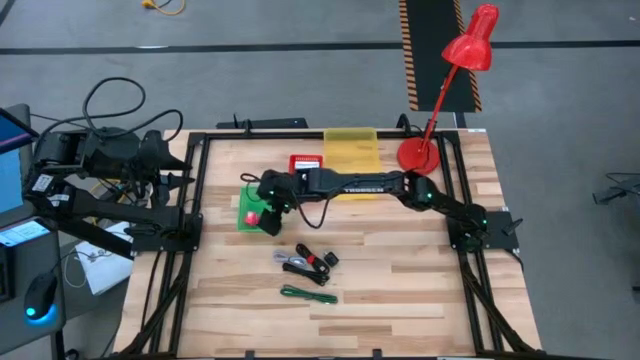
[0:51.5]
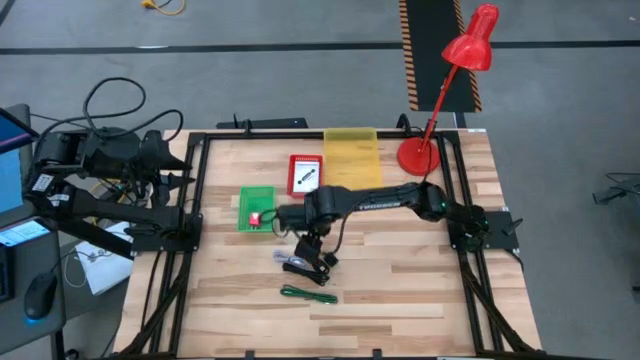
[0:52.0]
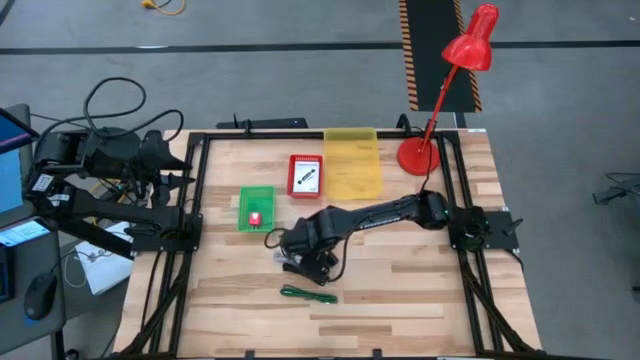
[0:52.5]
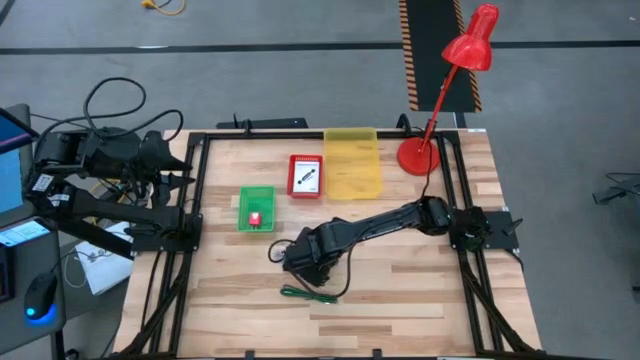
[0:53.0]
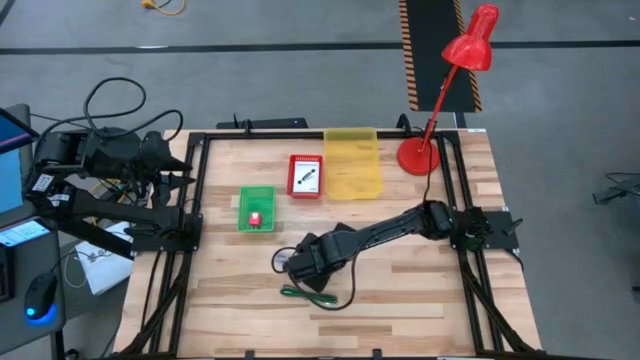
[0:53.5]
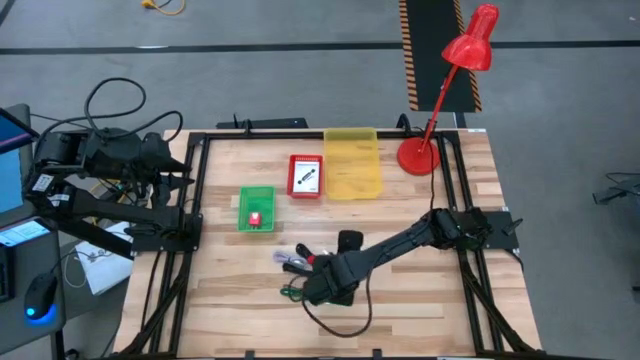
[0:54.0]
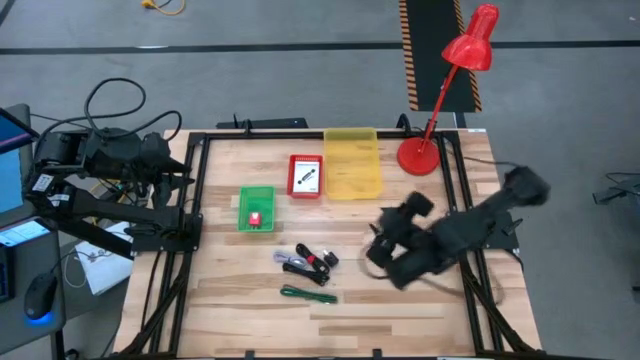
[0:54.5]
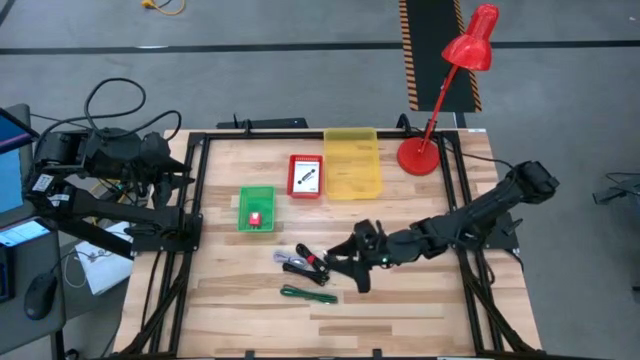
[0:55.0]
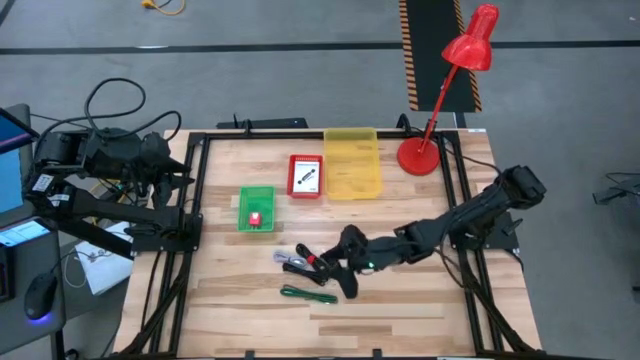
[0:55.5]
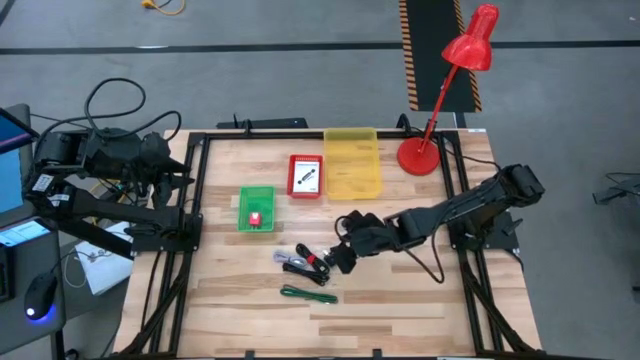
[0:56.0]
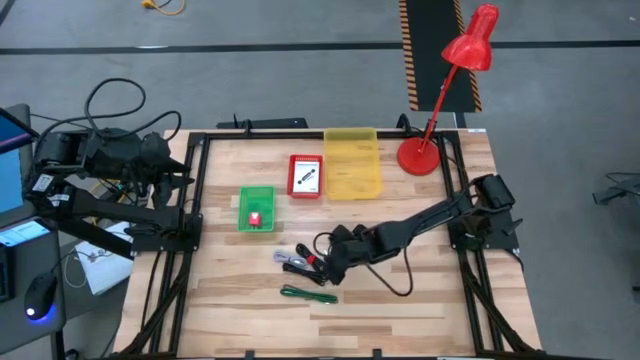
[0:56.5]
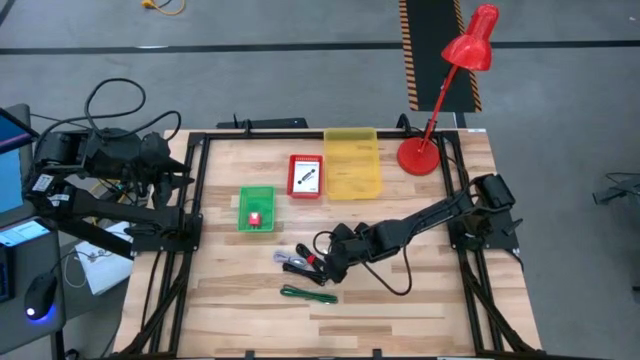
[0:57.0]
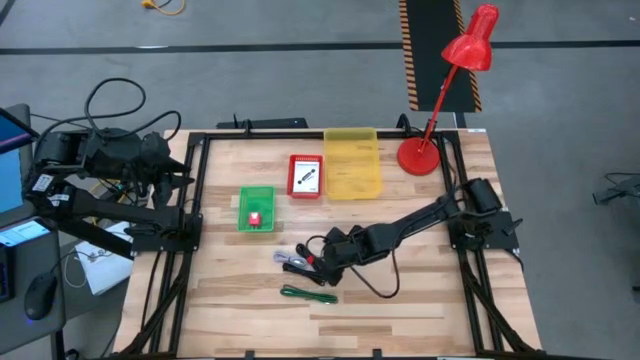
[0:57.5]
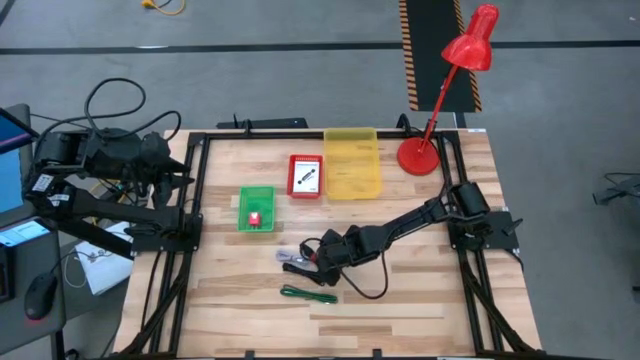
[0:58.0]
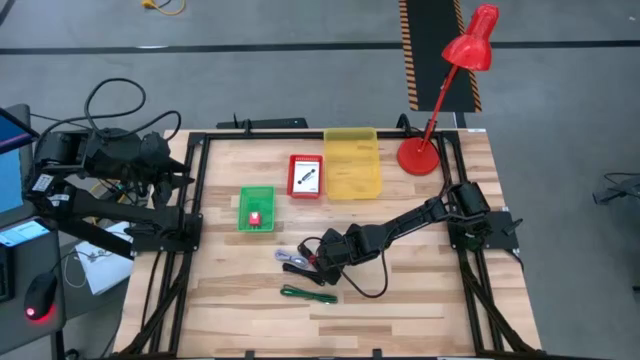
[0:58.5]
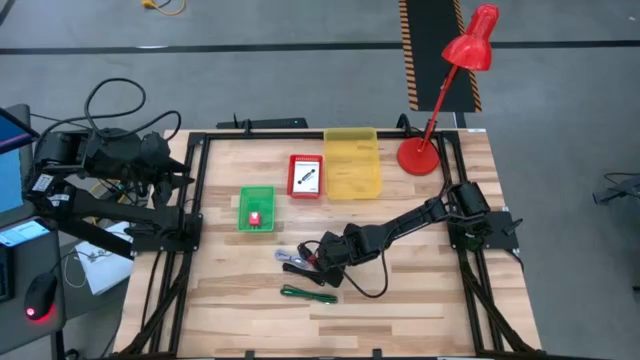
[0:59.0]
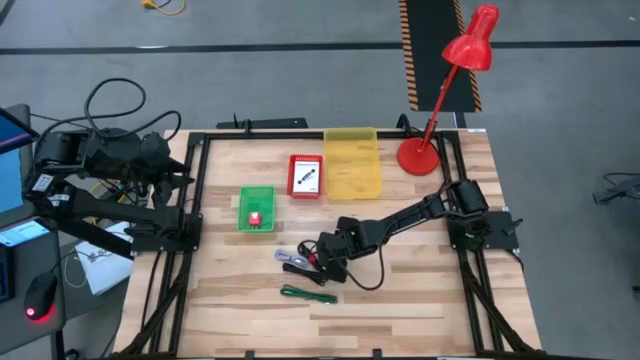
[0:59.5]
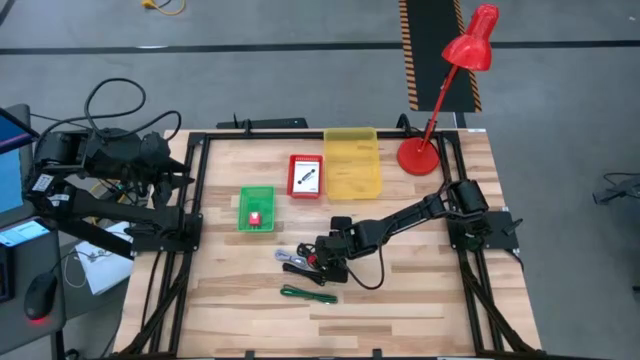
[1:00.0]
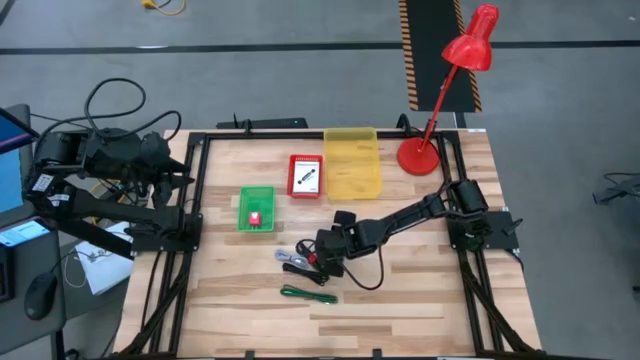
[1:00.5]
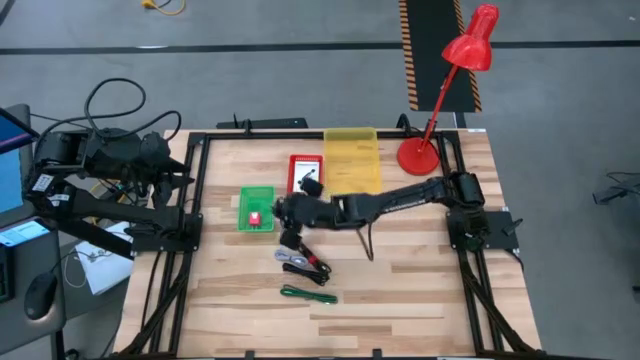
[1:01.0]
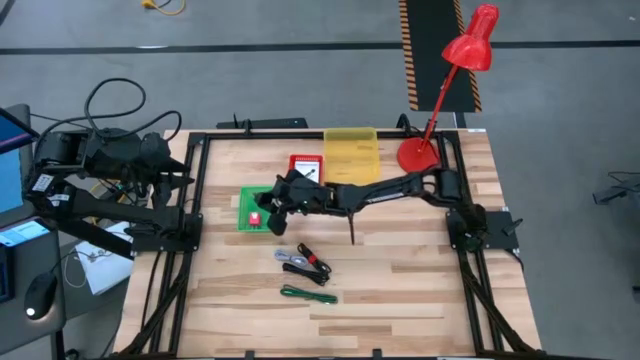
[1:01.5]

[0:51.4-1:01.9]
Task: Pick and place items into bin
Put the black charger adapter into the green bin

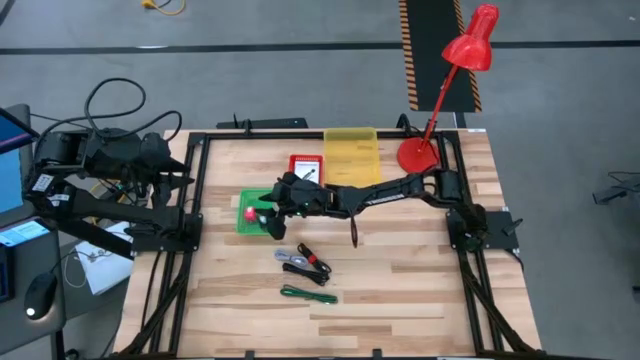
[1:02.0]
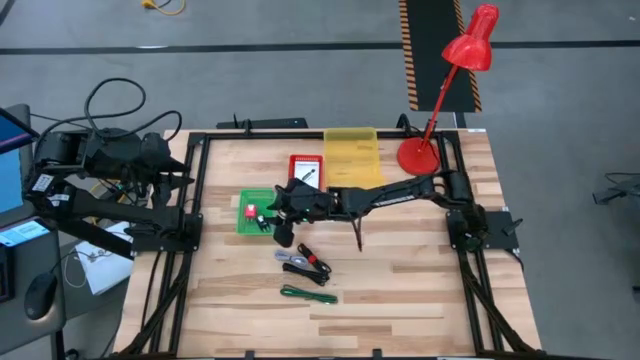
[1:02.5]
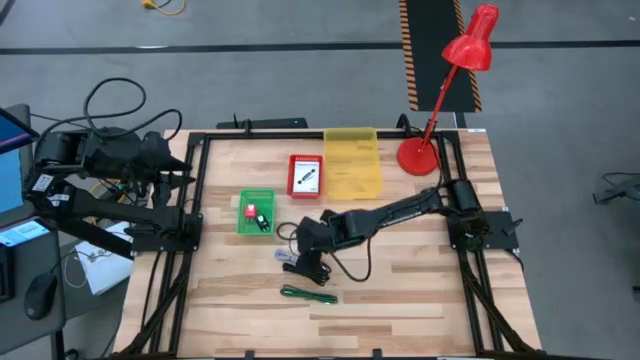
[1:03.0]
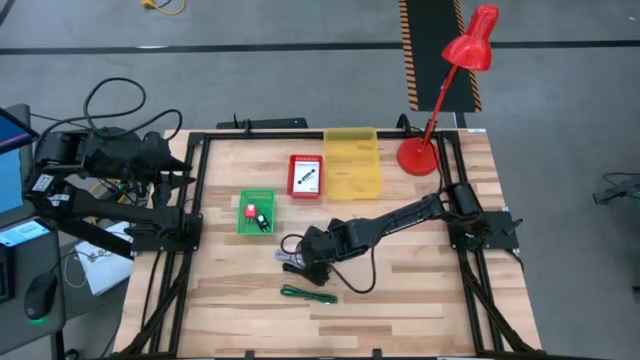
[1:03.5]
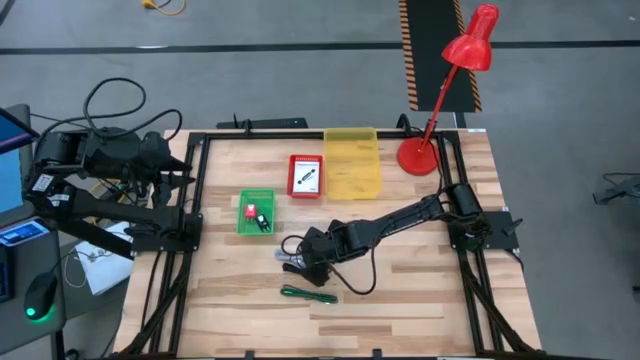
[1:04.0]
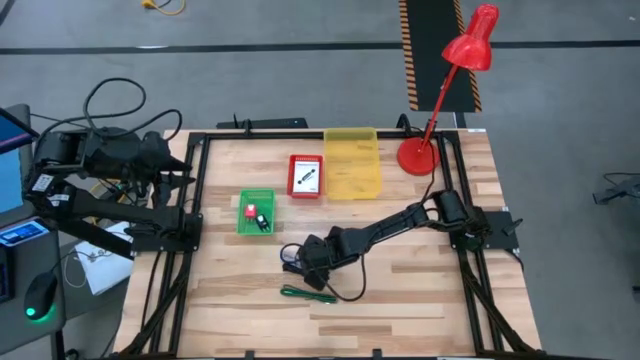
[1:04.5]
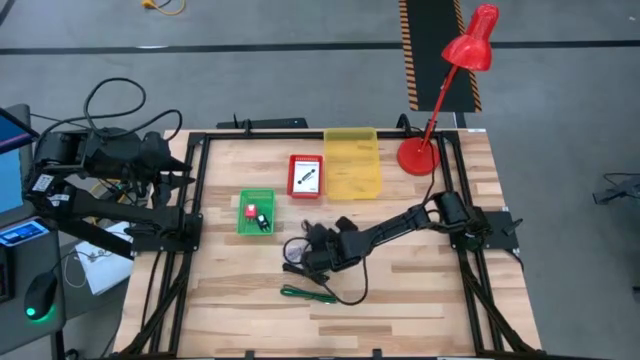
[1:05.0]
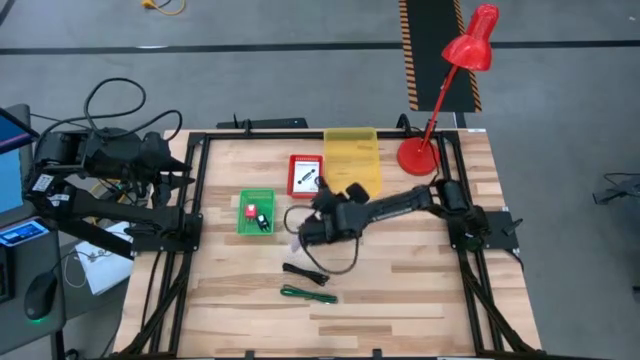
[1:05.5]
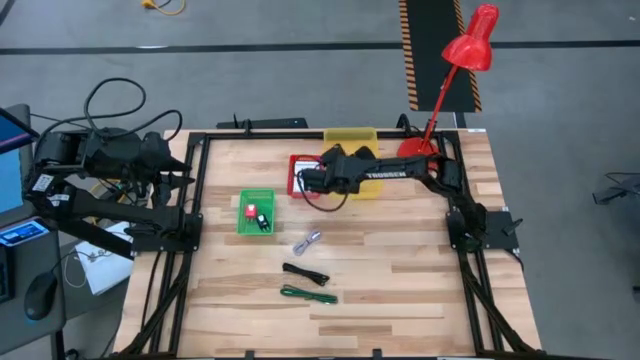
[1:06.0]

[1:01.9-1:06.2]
Put the top black charger cable into the yellow bin

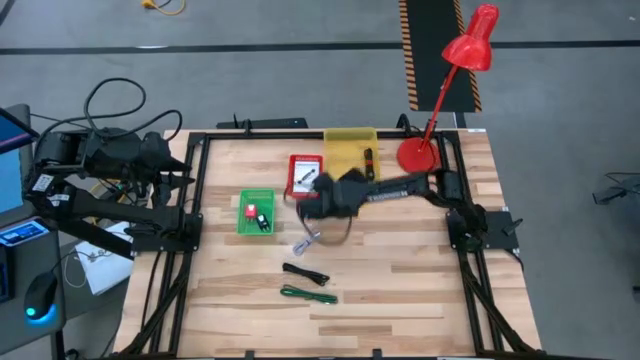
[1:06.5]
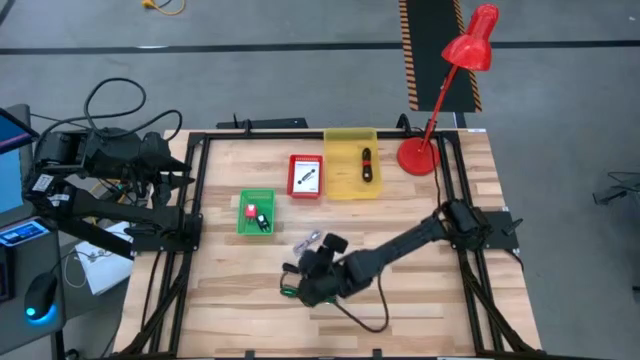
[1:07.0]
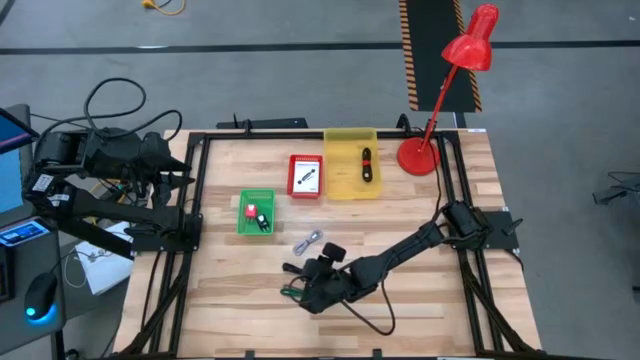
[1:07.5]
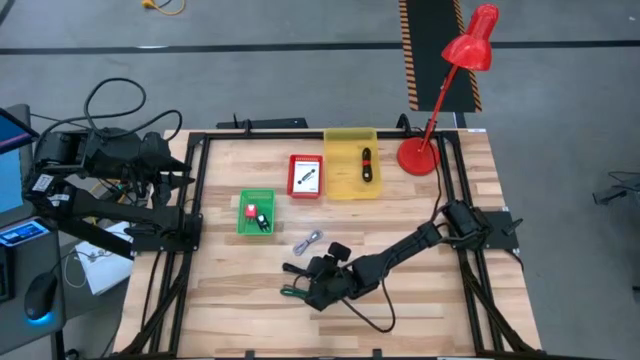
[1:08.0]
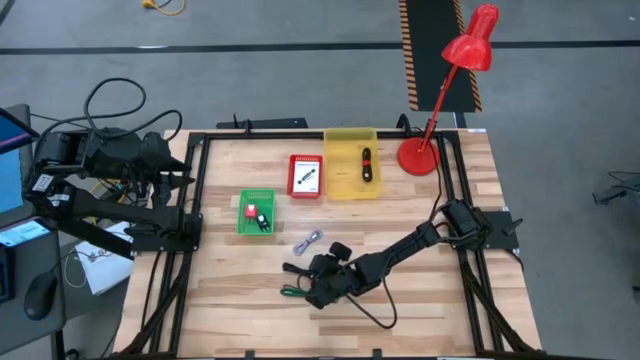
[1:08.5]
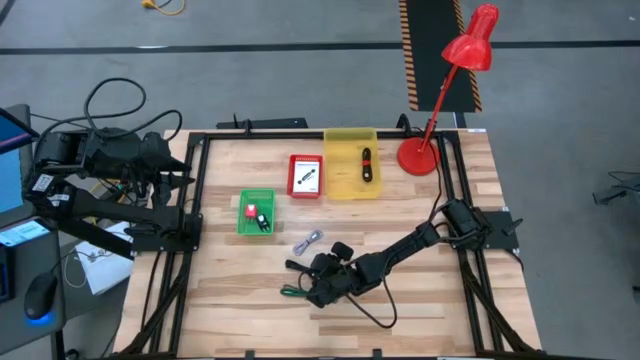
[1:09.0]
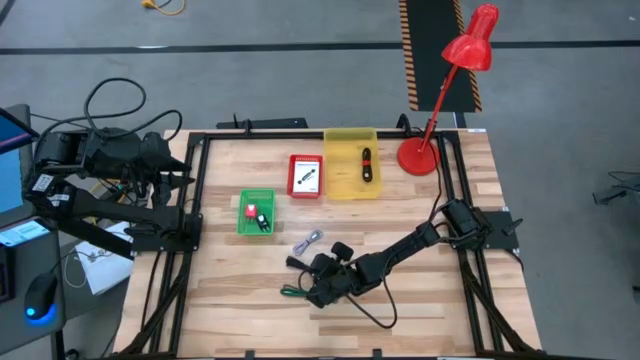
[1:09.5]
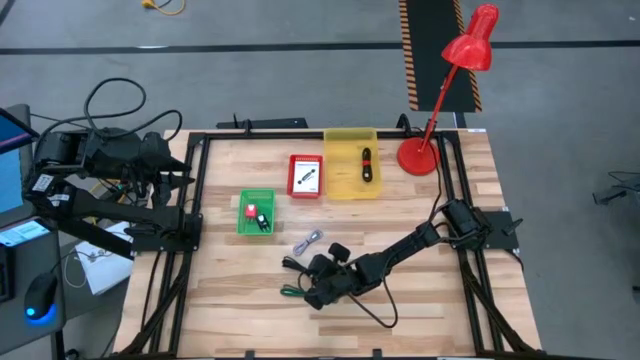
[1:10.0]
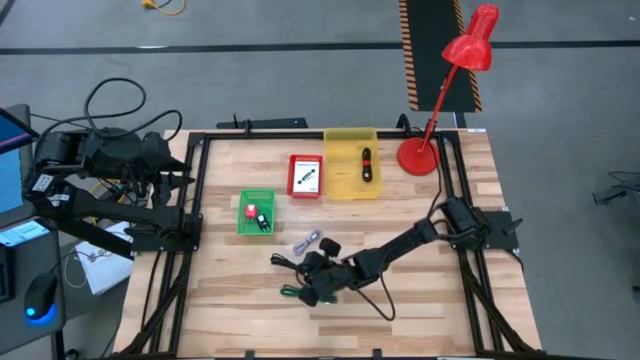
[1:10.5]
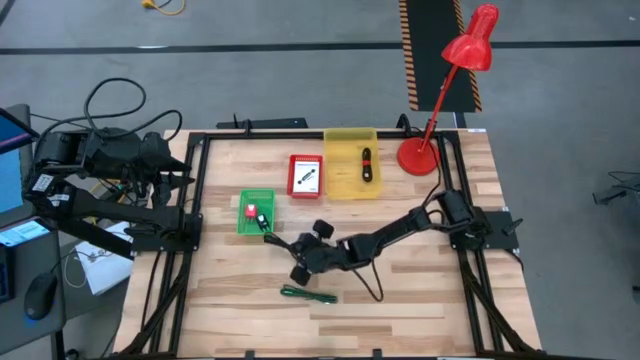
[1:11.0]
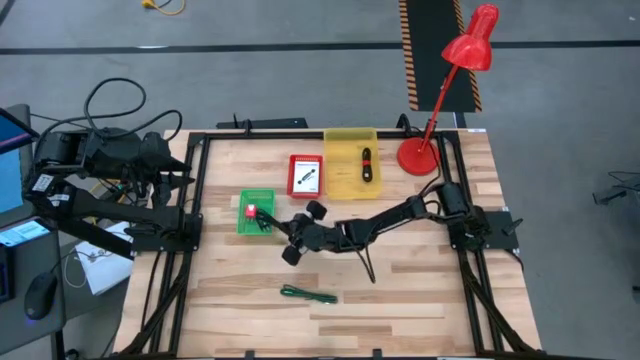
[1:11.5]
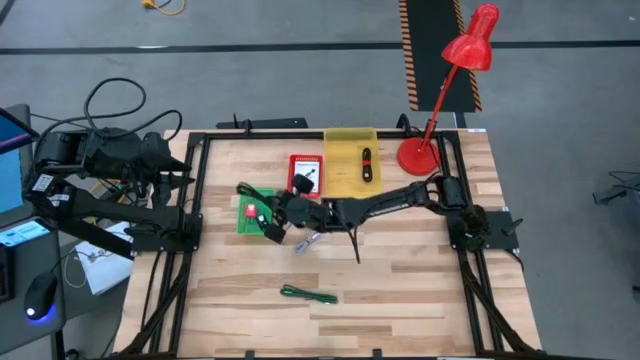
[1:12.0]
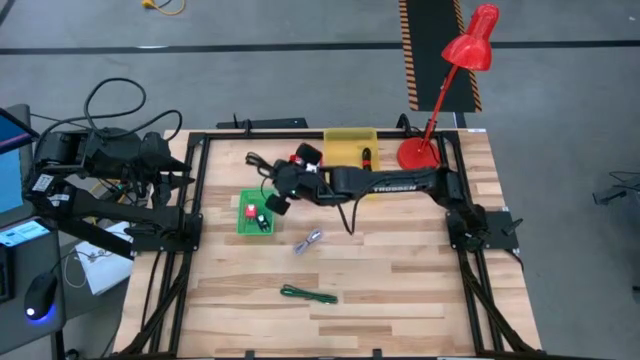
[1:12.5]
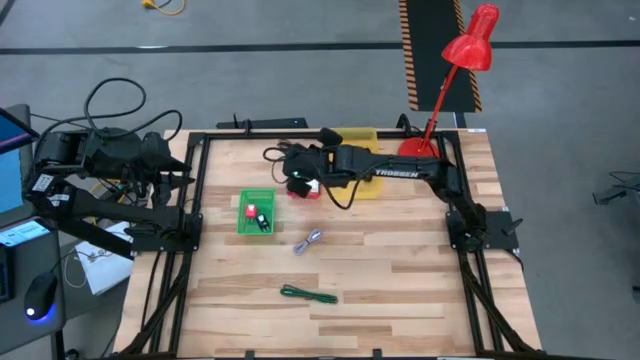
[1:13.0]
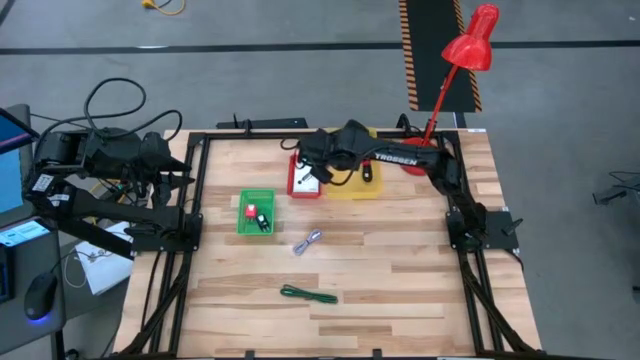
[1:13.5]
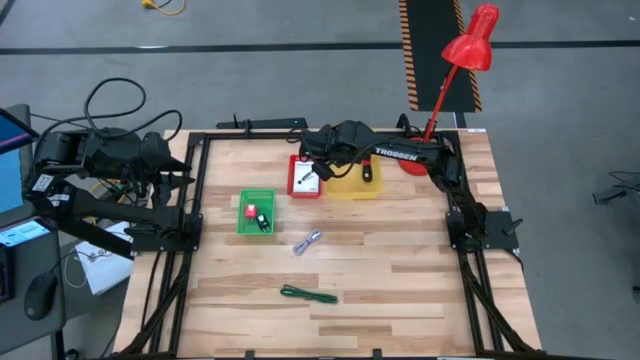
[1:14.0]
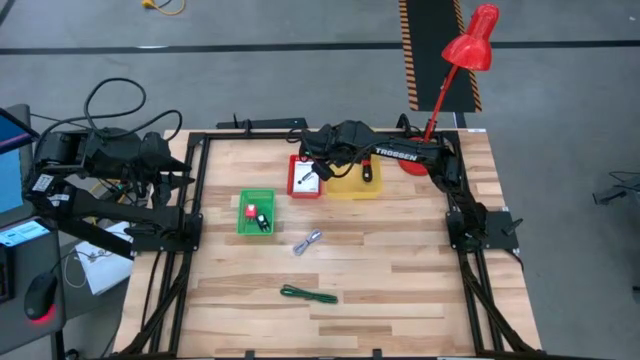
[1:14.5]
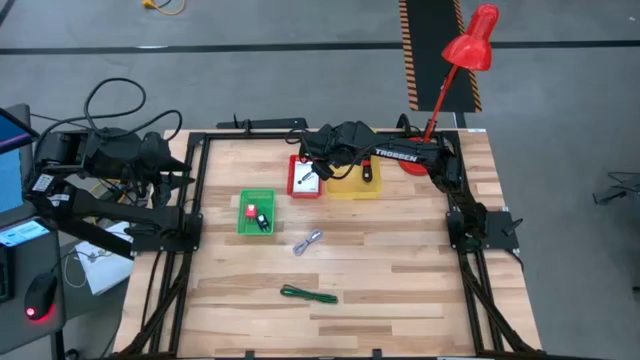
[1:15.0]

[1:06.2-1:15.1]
Put the black charger cable into the yellow bin
